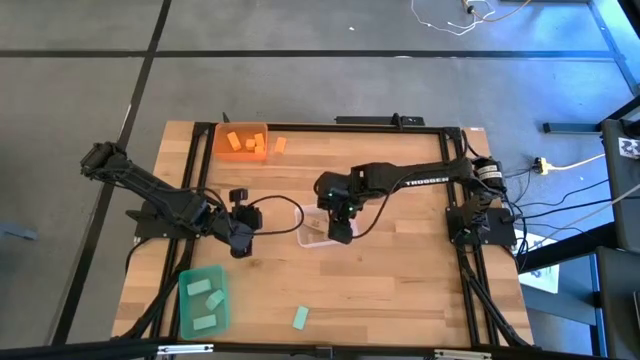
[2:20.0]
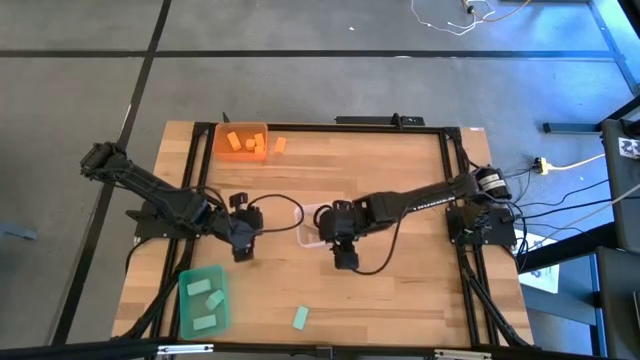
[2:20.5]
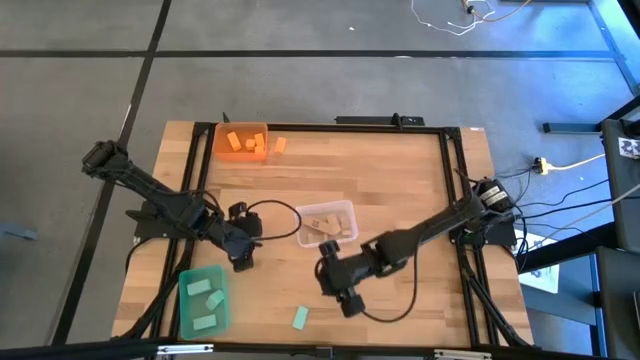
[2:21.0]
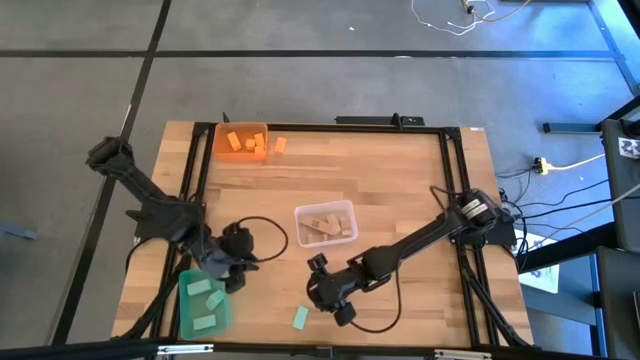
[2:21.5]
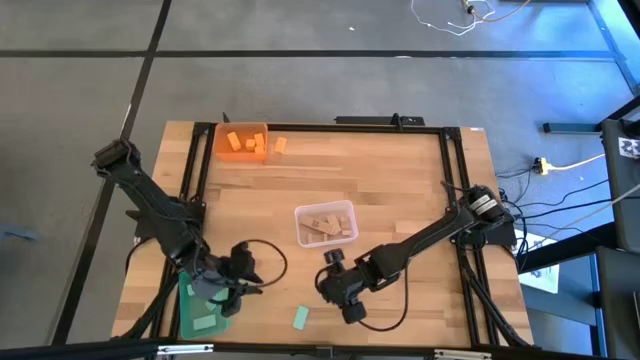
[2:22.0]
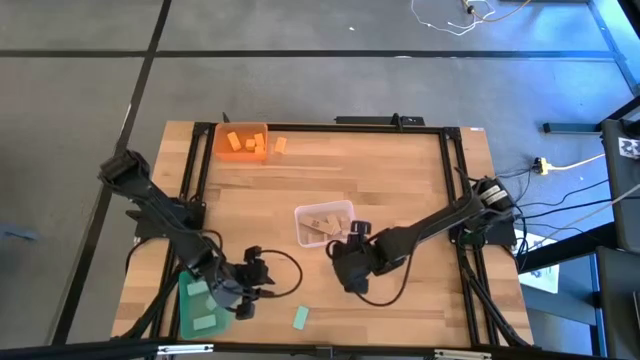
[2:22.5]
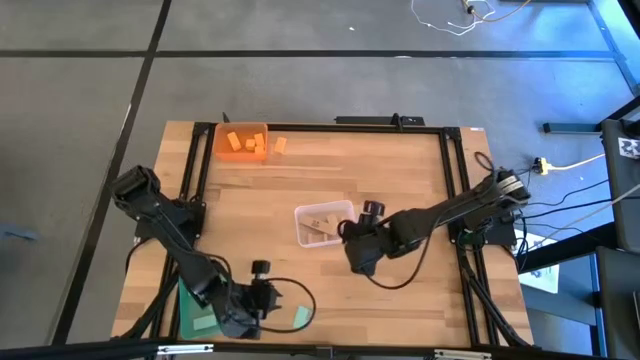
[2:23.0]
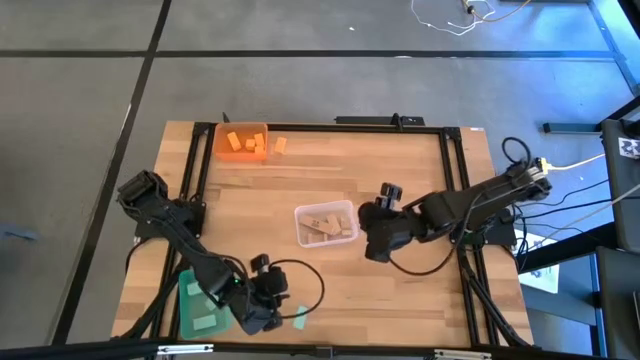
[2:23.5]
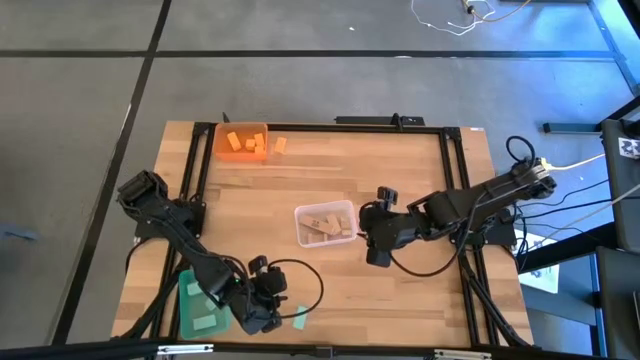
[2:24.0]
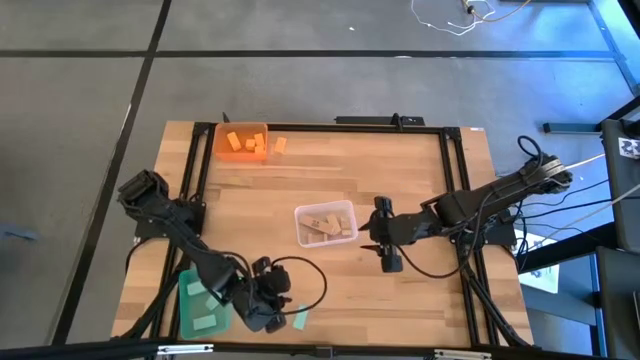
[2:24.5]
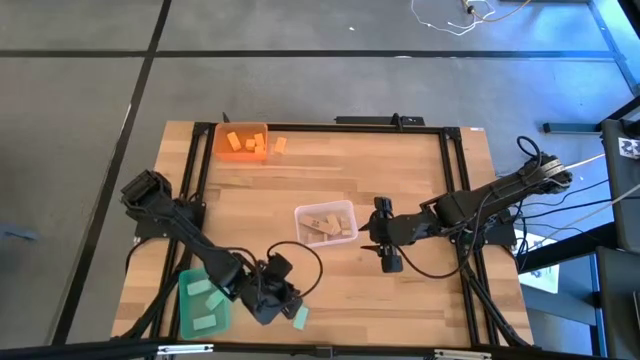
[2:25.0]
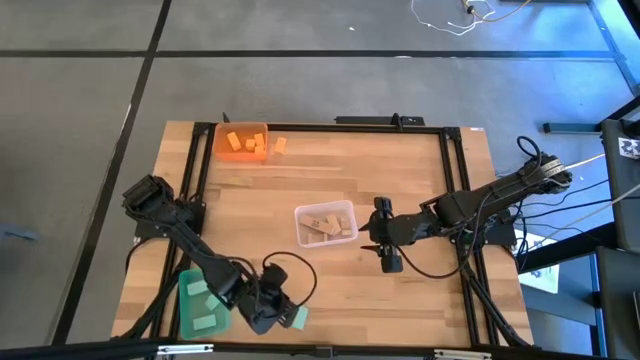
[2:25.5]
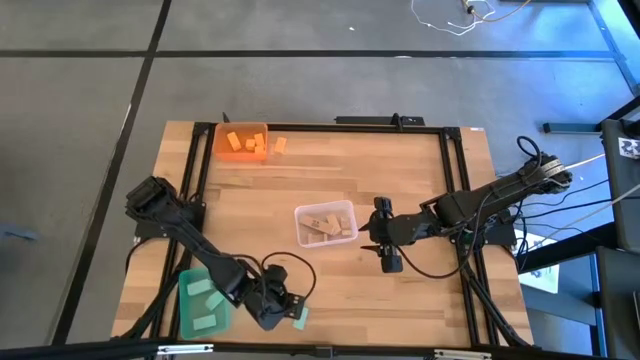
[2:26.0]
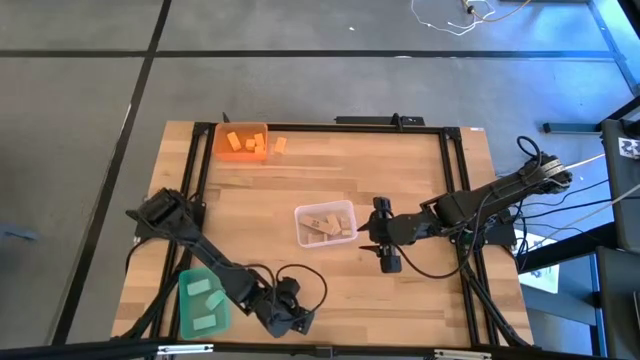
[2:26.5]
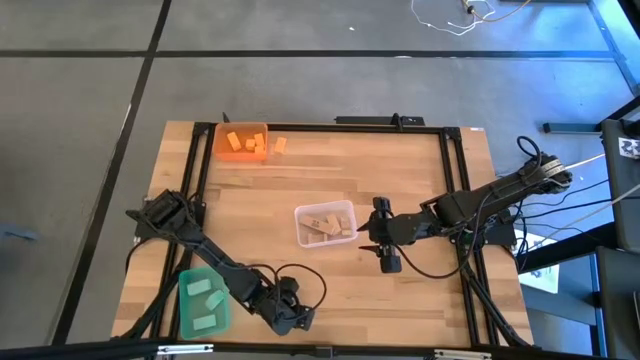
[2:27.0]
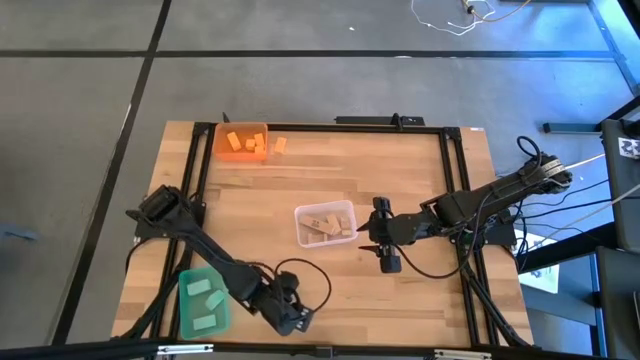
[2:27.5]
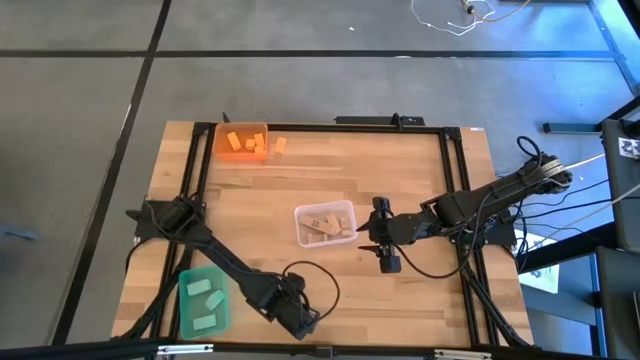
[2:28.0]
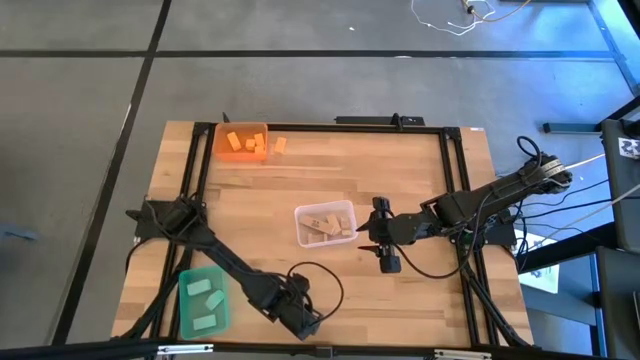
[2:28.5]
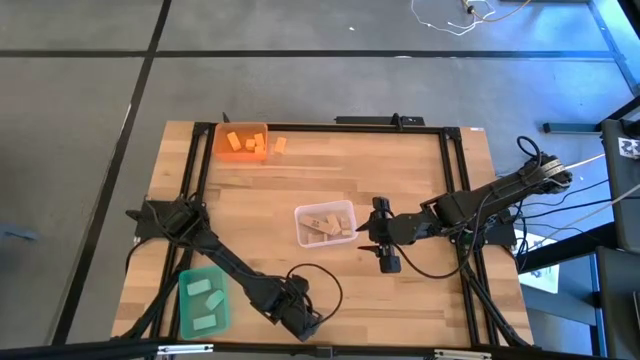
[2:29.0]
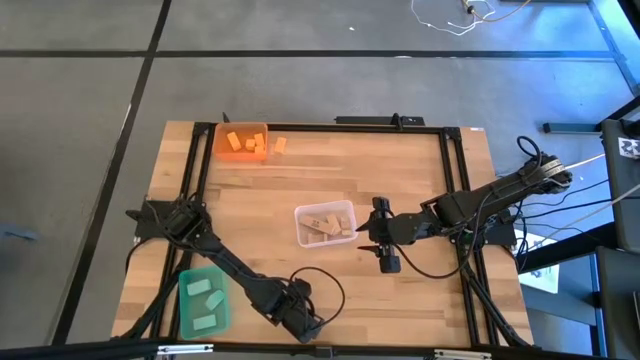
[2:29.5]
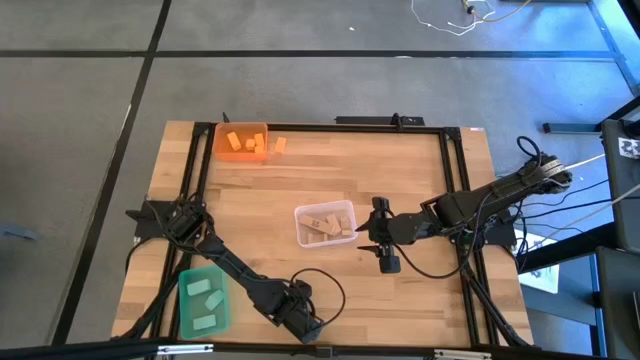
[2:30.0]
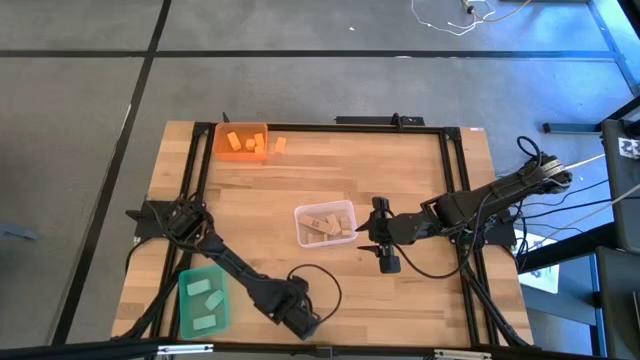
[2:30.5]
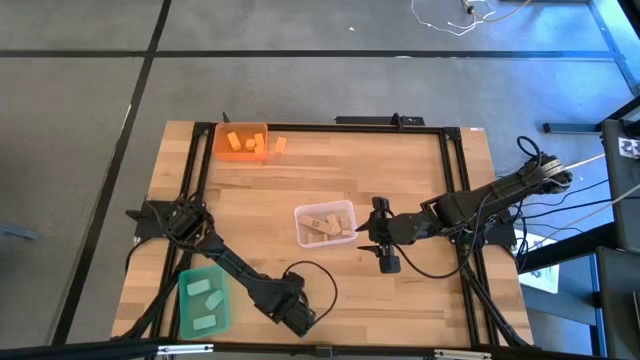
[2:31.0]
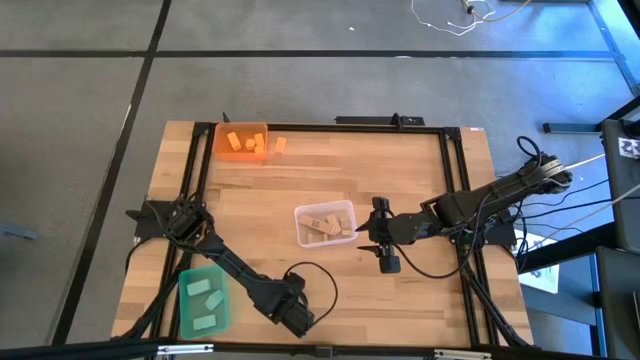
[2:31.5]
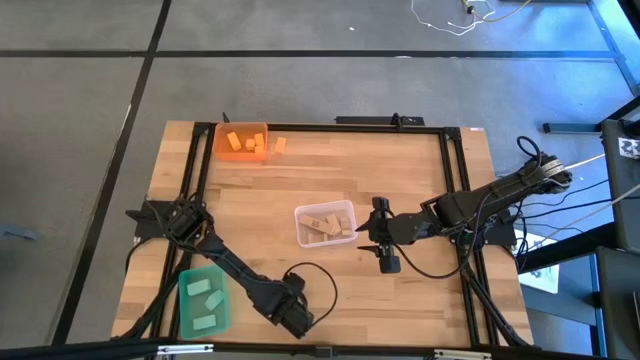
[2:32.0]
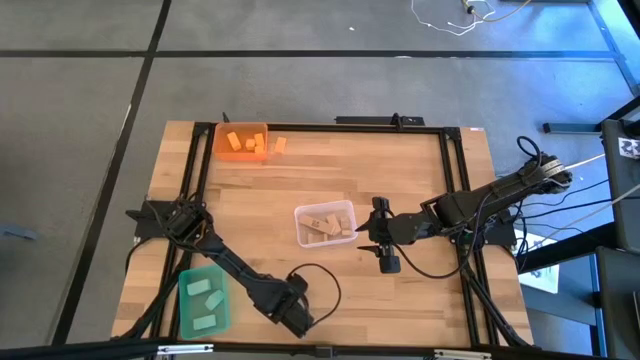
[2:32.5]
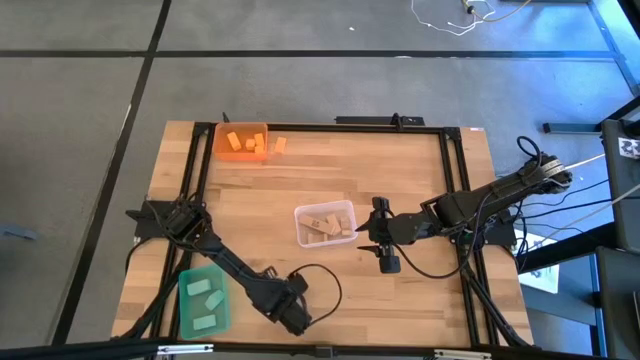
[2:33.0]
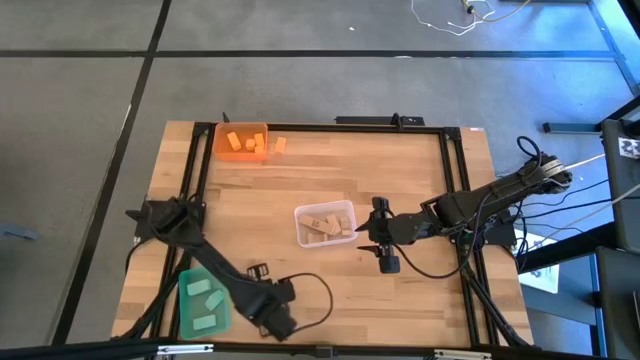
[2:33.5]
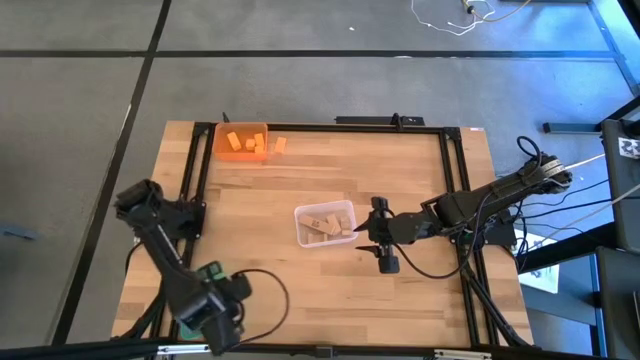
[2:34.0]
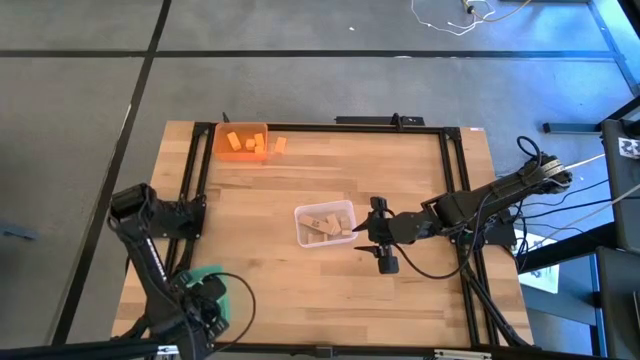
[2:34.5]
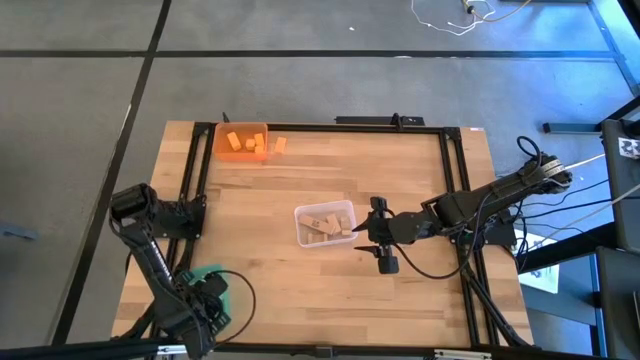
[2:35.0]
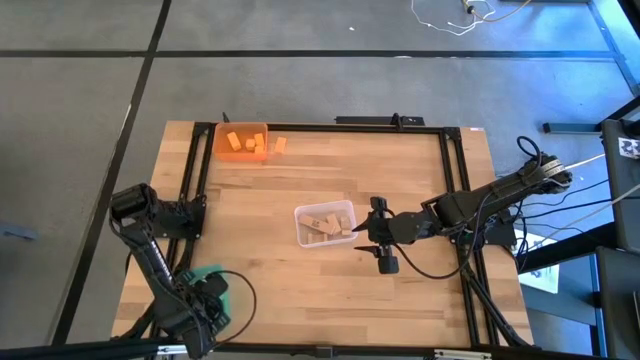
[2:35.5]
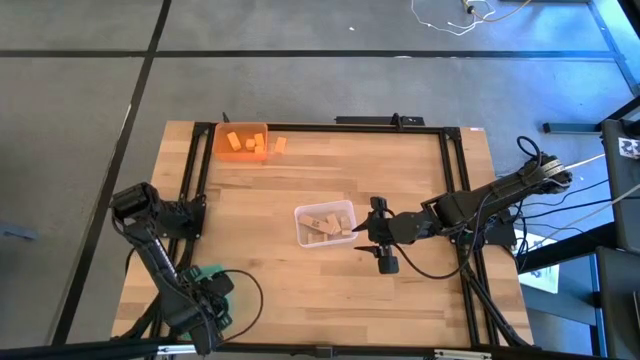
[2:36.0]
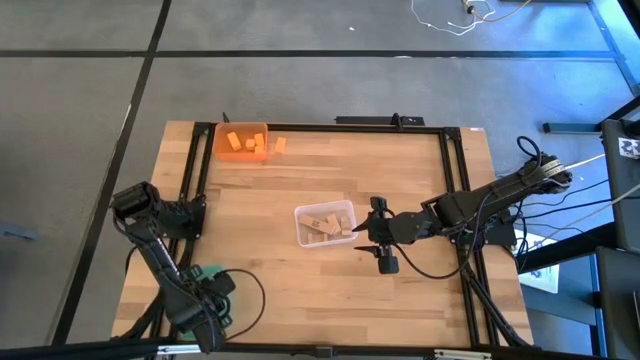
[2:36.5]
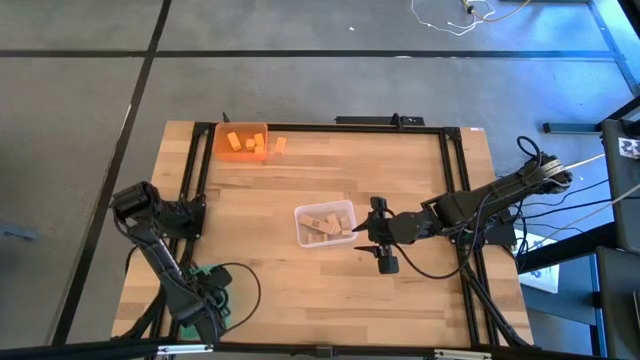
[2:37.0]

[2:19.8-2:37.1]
Task: Sort & place blocks by color
Put the blue block into the green bin

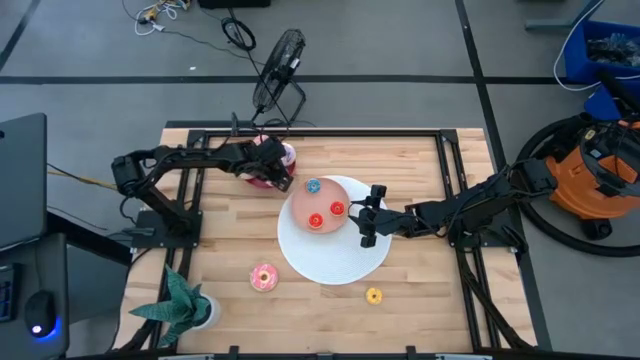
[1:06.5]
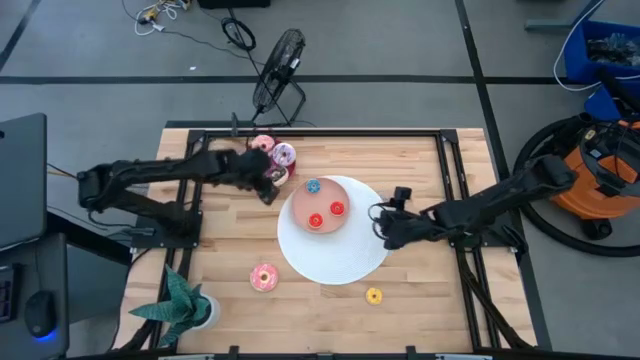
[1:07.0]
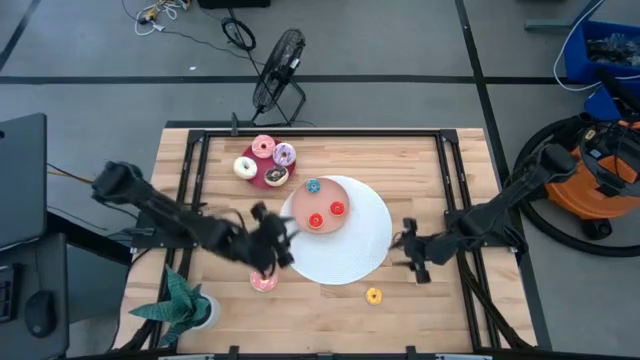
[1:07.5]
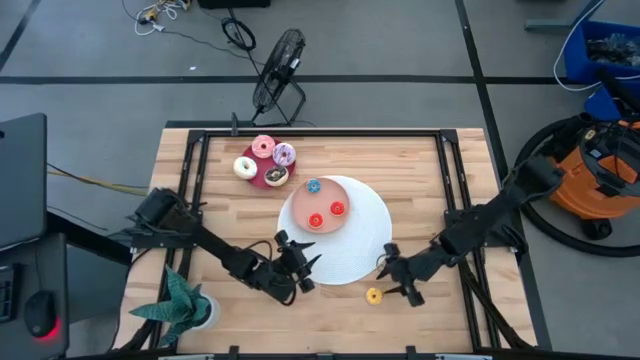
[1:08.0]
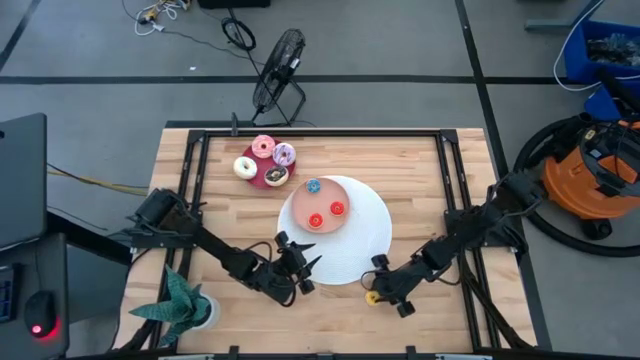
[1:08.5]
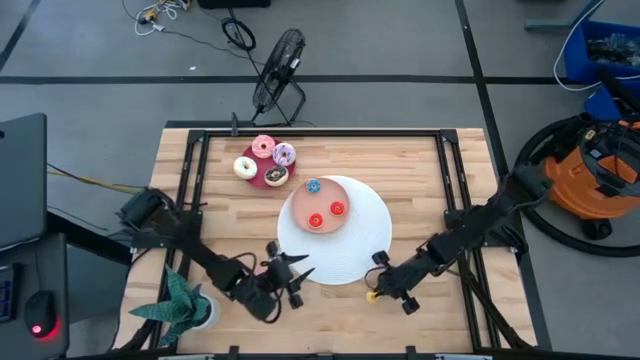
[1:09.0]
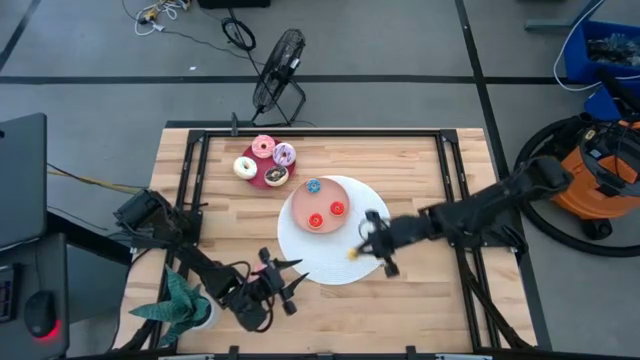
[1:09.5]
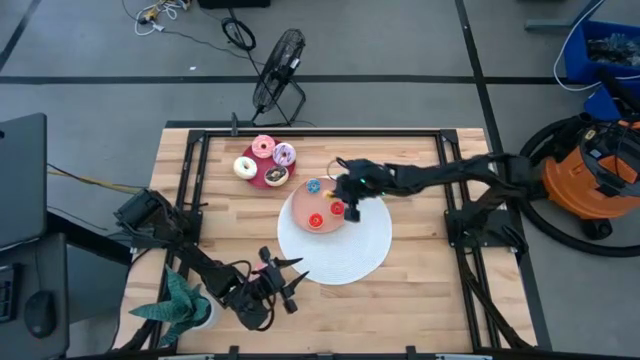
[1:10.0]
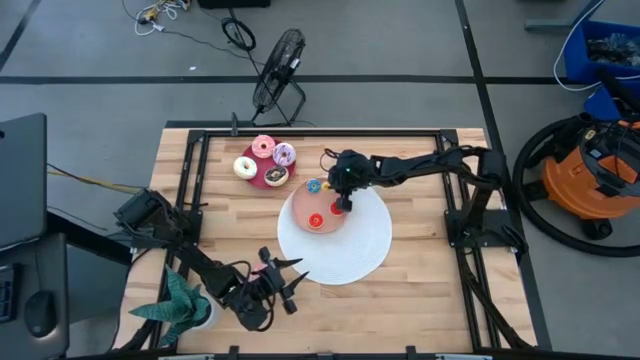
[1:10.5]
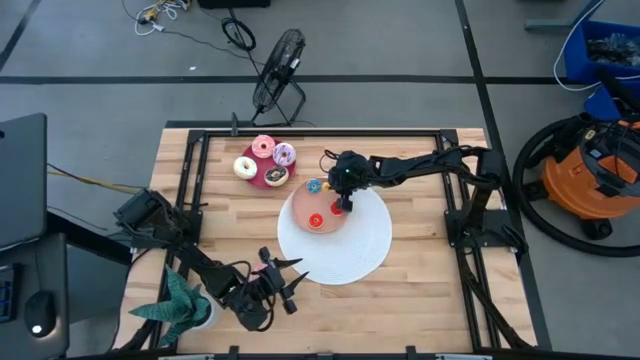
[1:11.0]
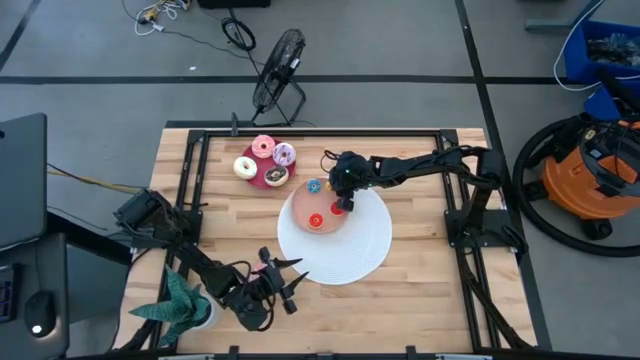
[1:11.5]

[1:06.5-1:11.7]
Task: Pick & Place donuts
Put the small yellow donut on the light pink plate
